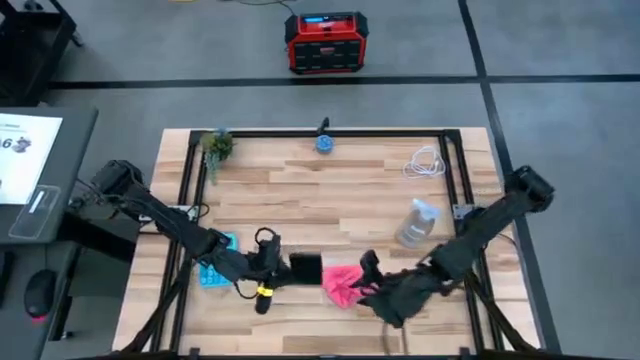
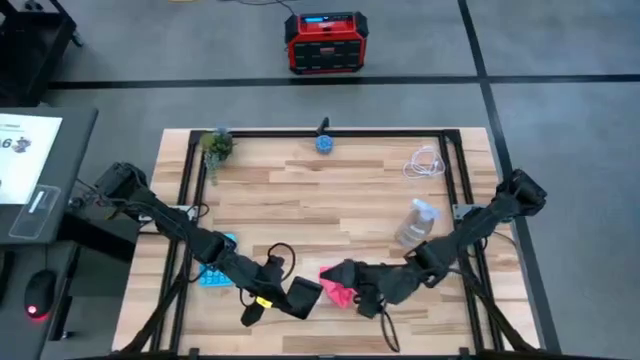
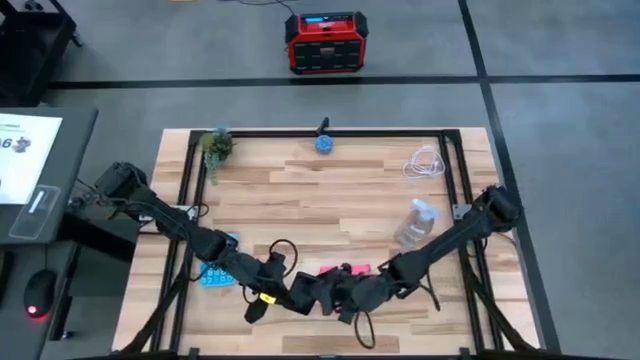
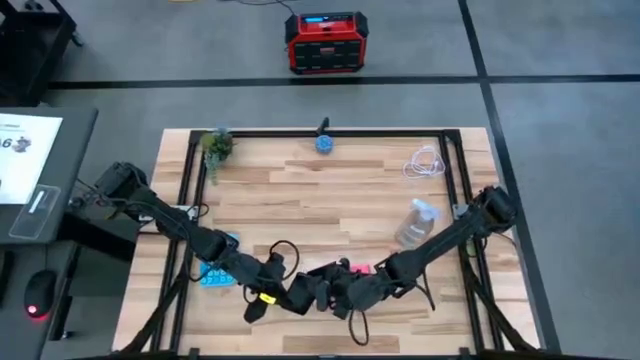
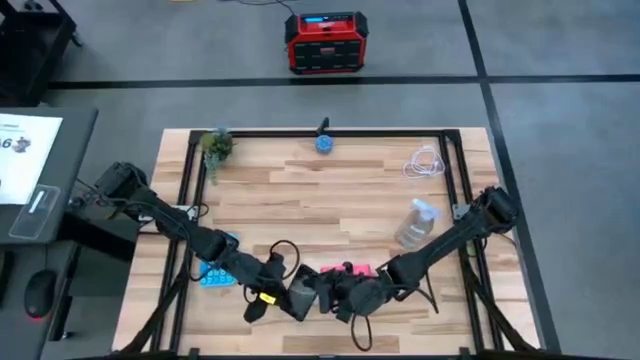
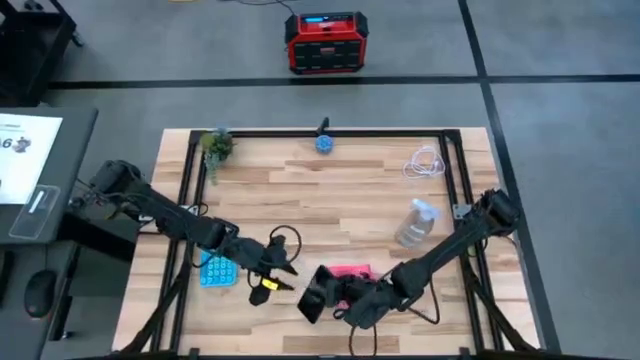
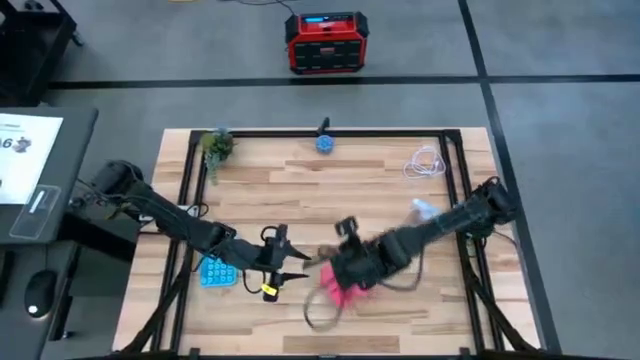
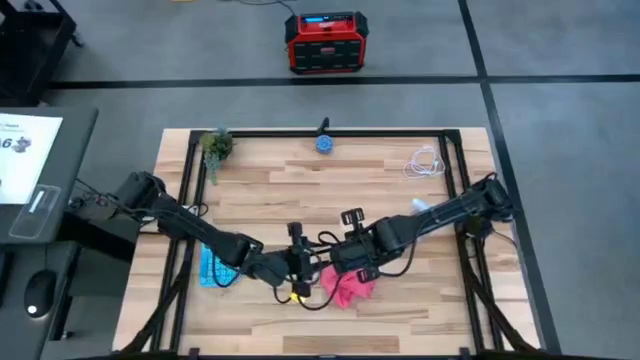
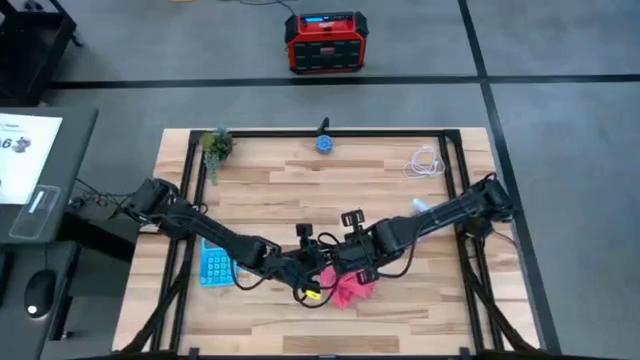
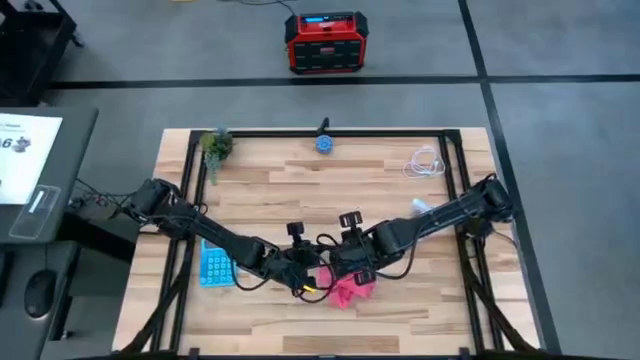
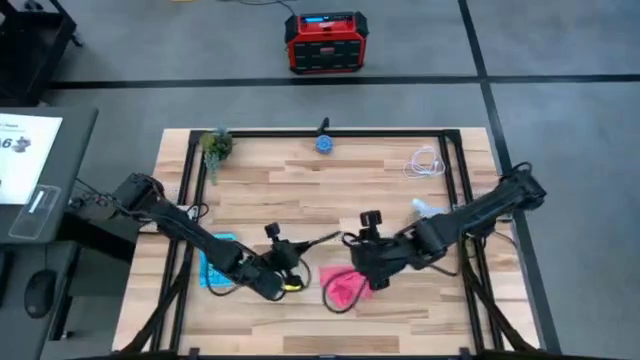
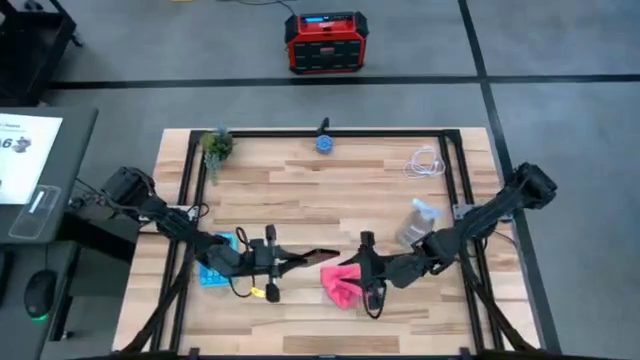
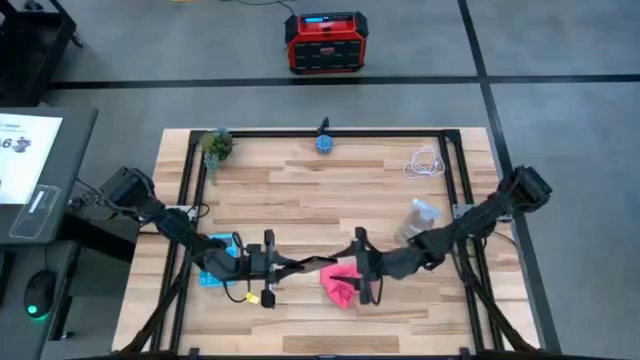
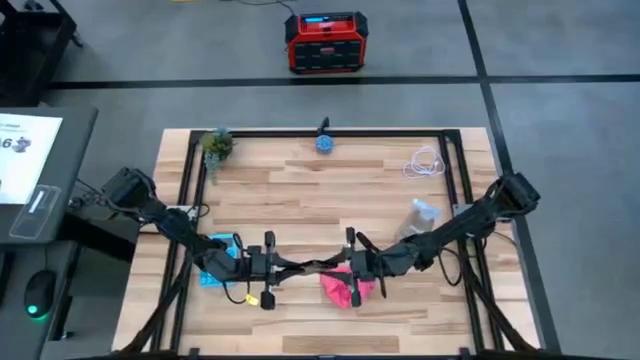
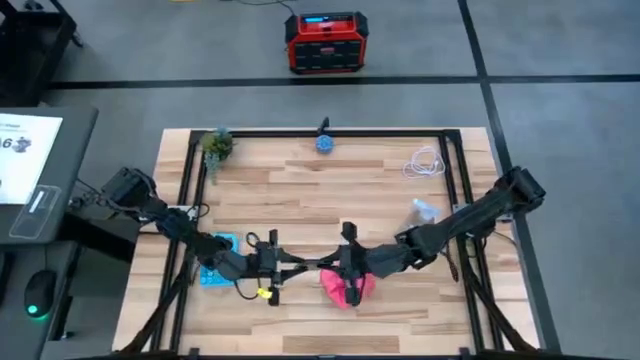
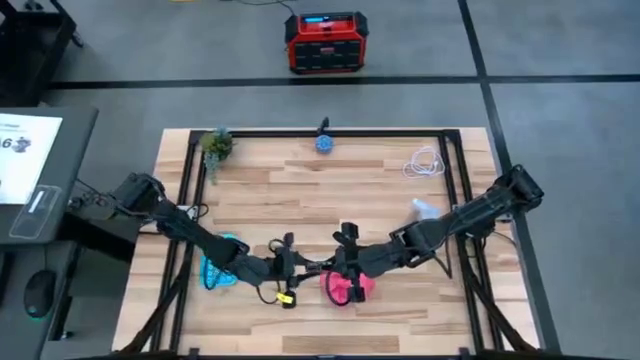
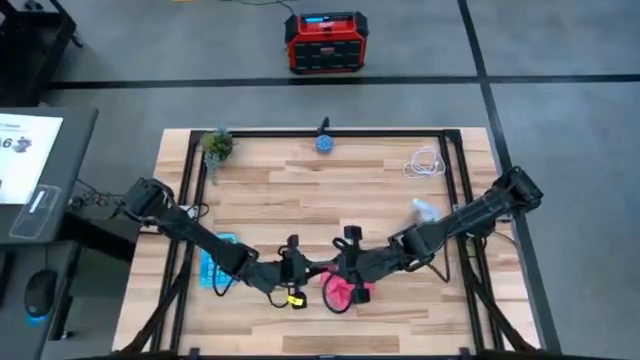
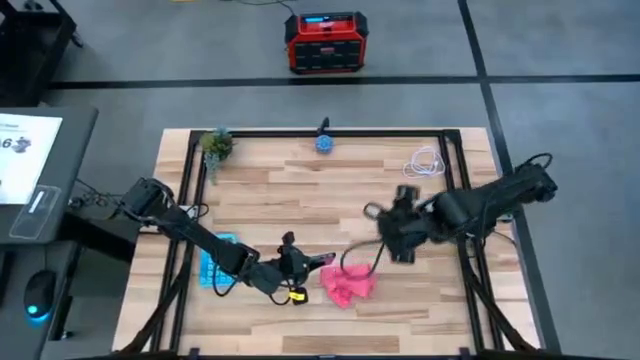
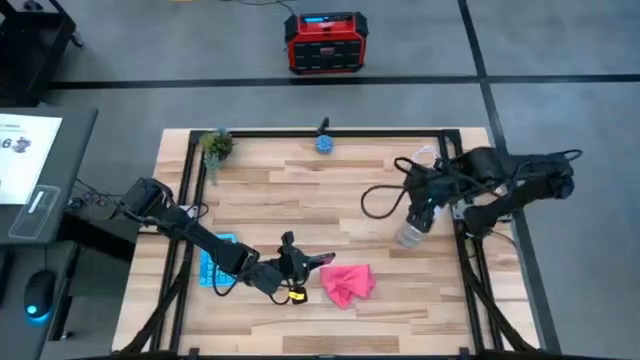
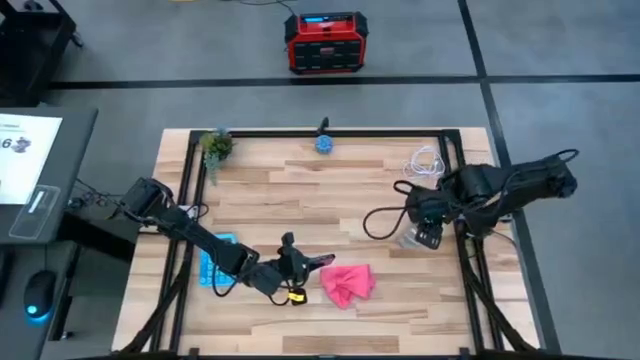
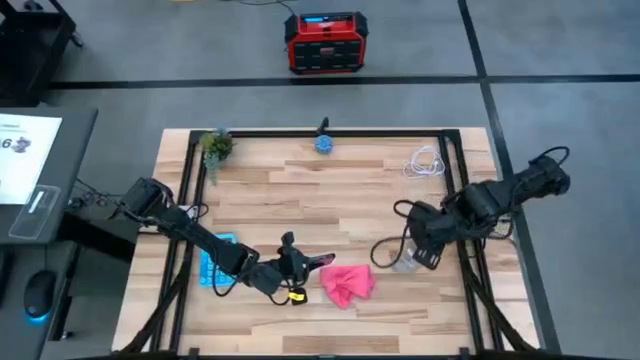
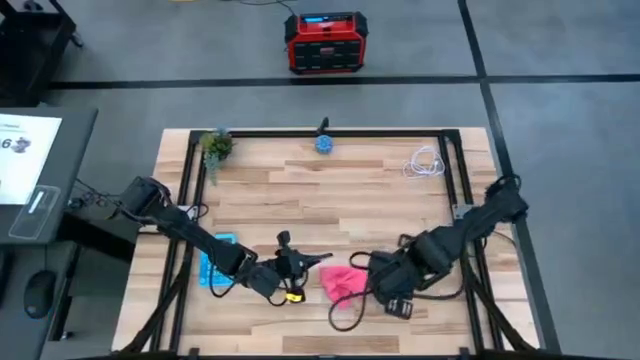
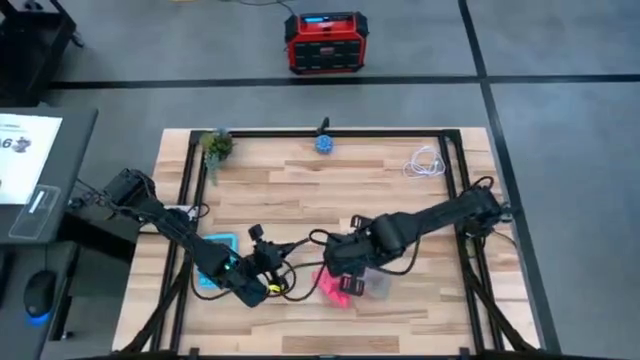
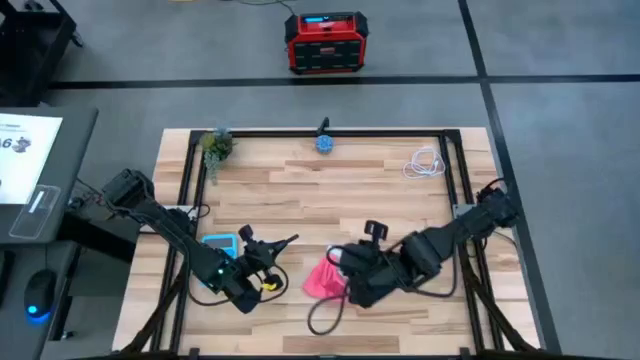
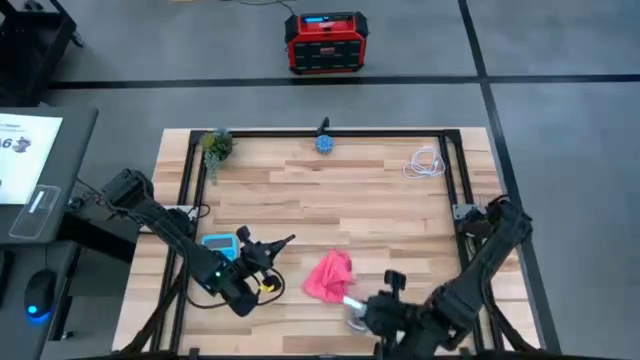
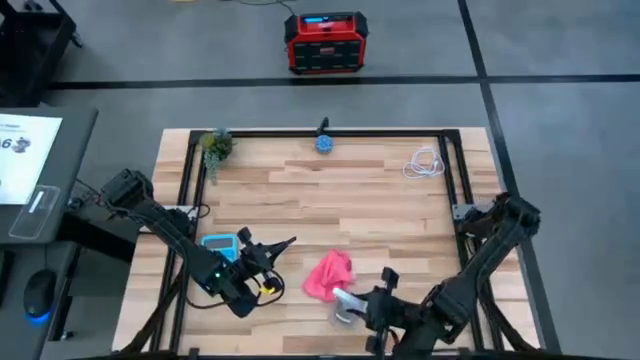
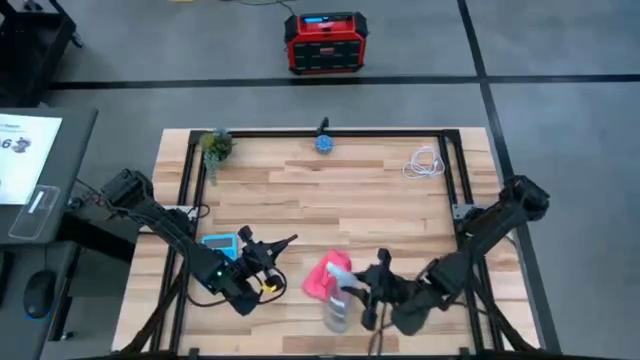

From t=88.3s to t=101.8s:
Task: Apply microfiber cloth
Spray the back of the black cellphone using transparent spray bottle

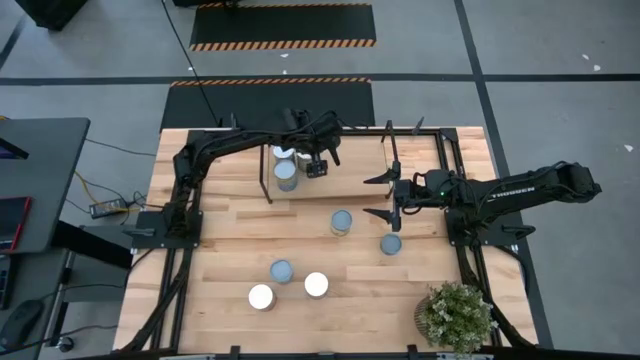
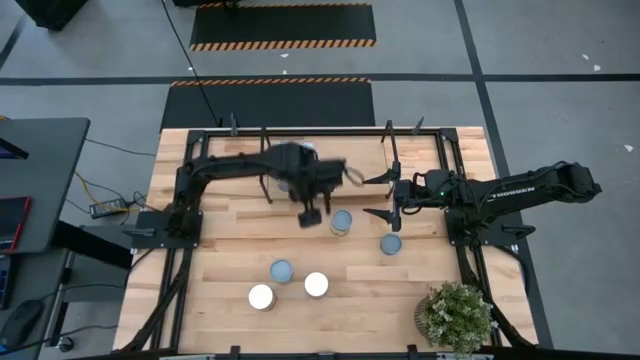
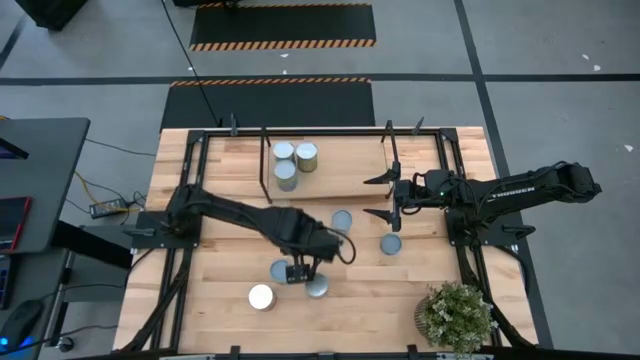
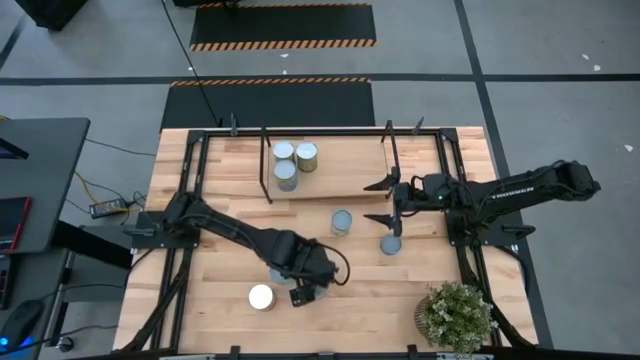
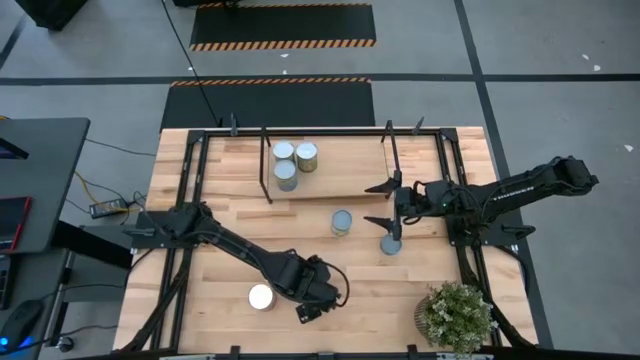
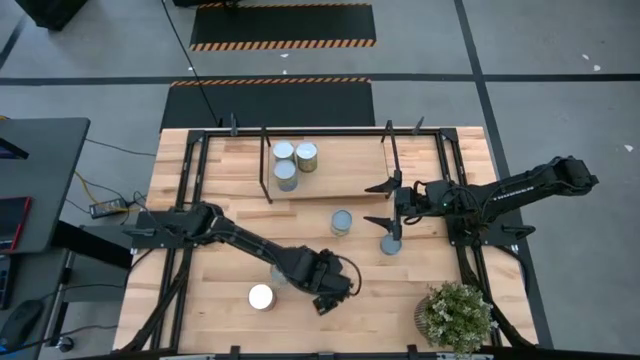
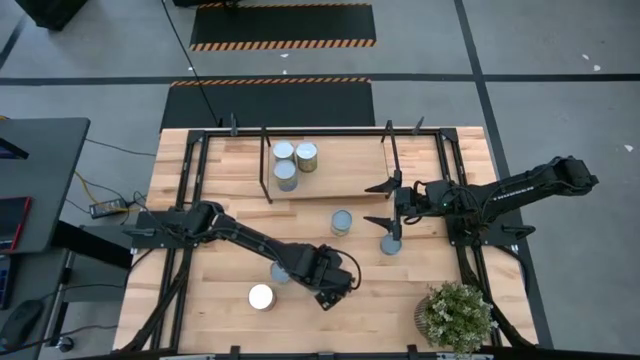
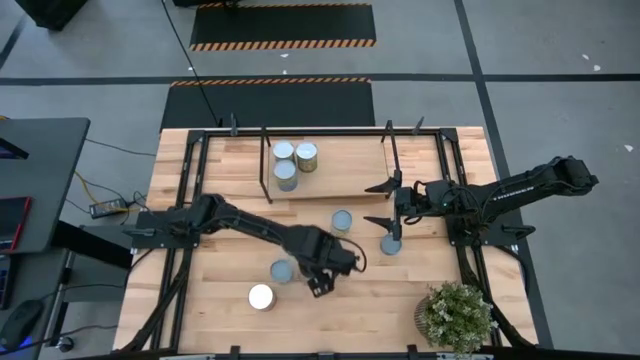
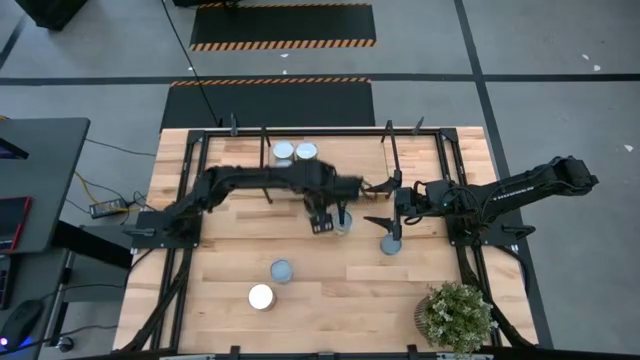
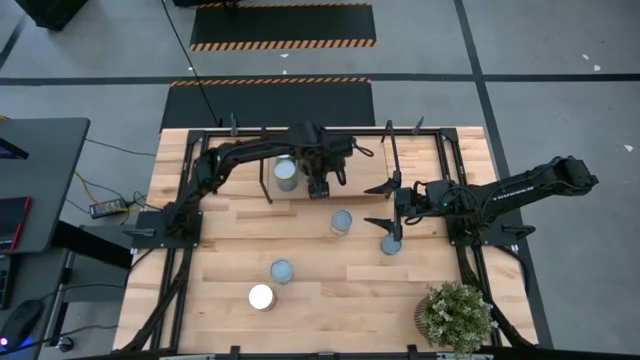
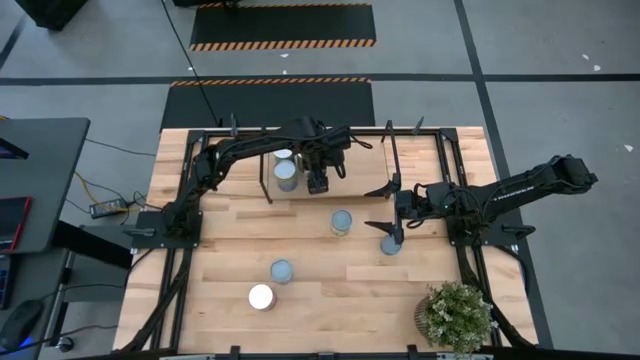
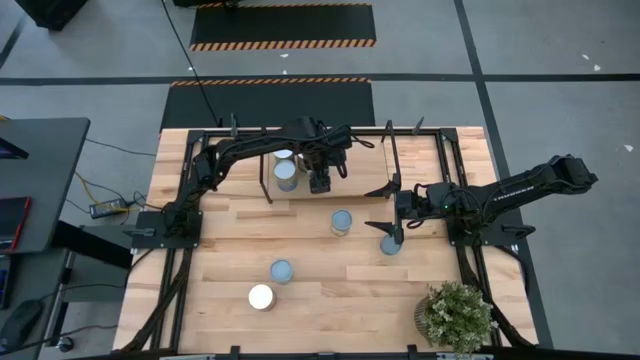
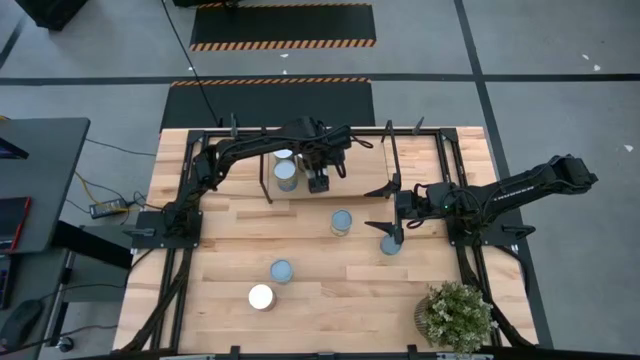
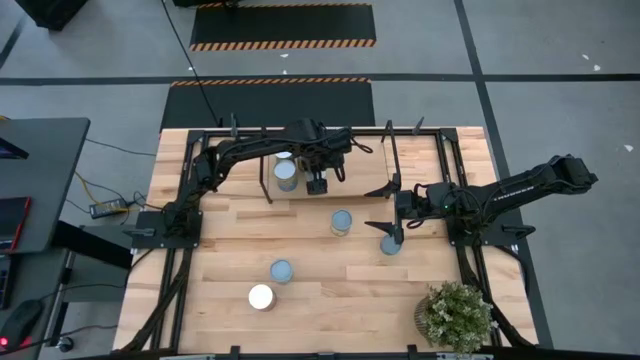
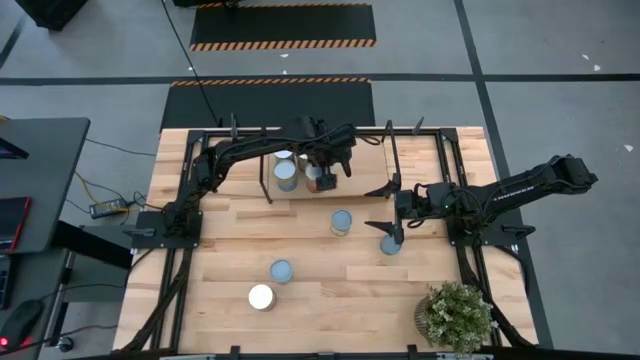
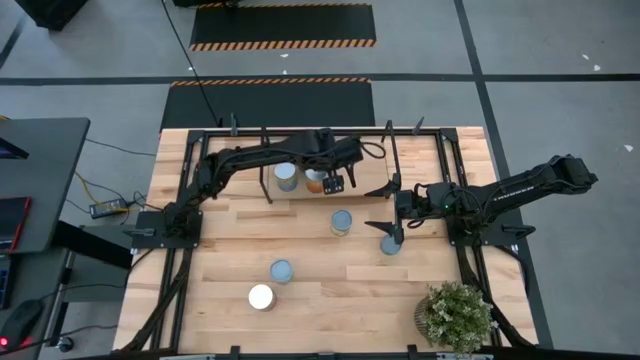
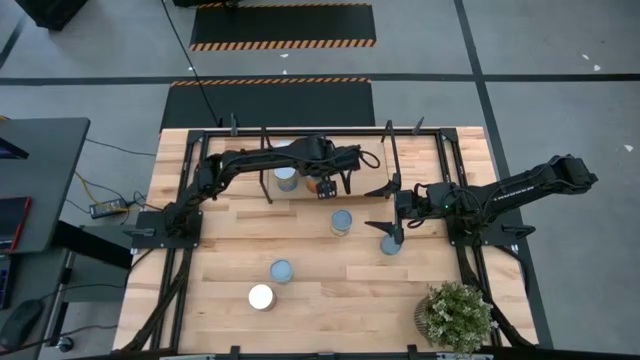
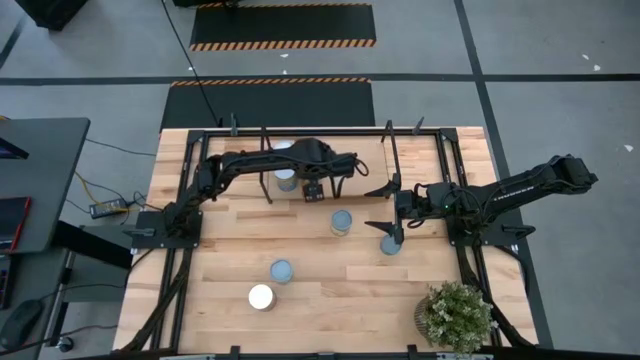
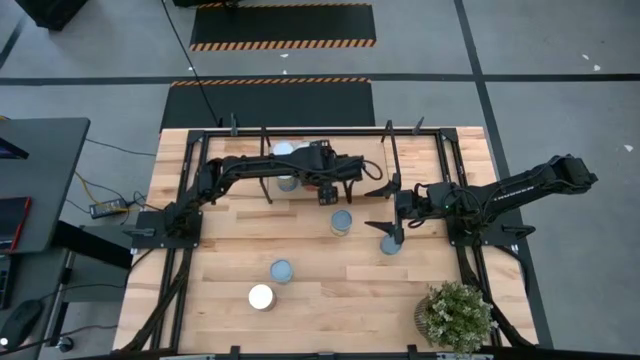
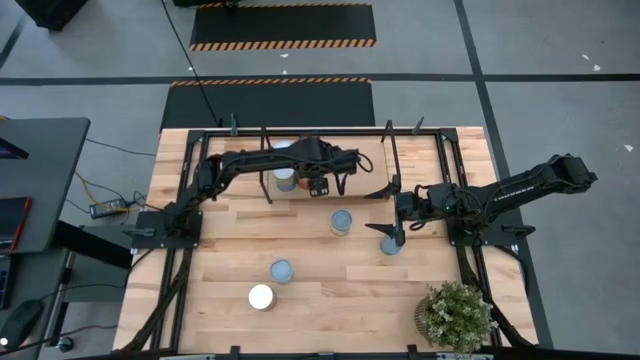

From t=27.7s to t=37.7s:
Task: Pick and place cans onto a shelf
Put the canned pineapple on the shelf
